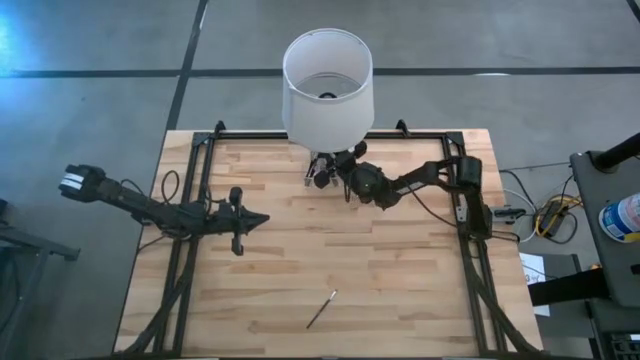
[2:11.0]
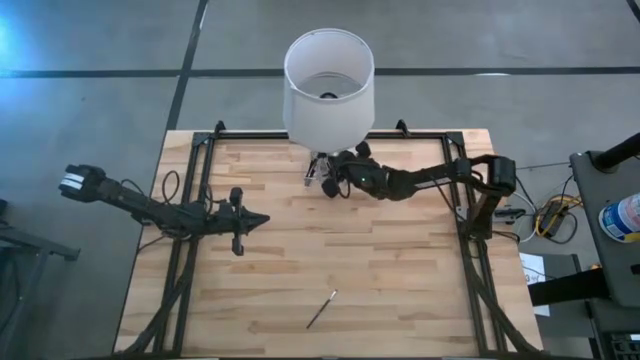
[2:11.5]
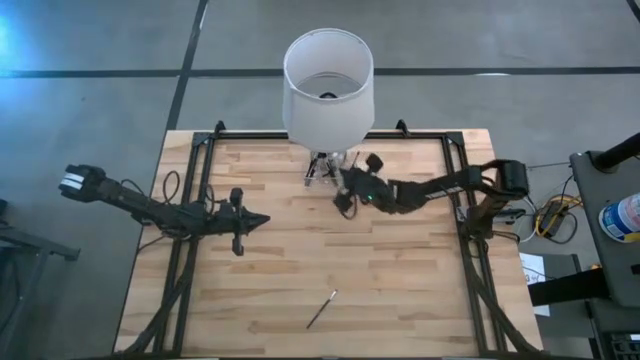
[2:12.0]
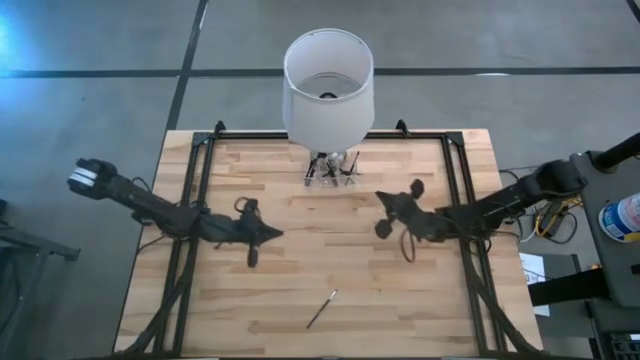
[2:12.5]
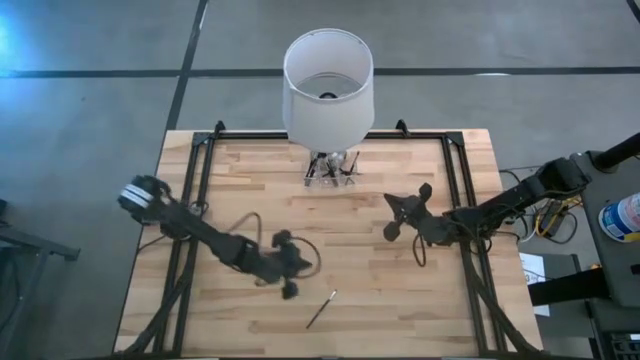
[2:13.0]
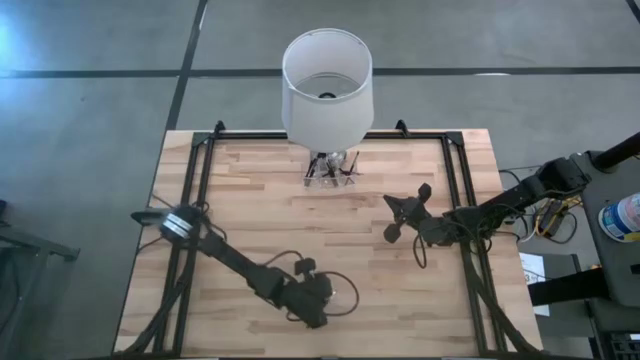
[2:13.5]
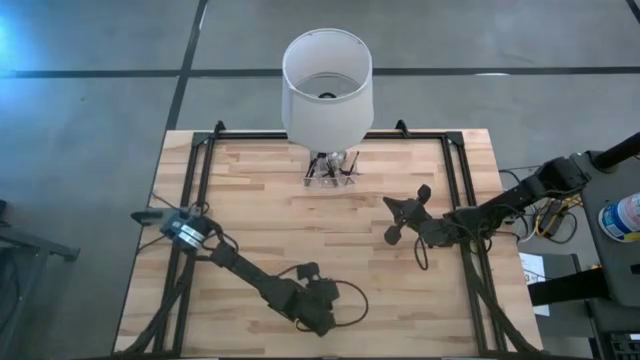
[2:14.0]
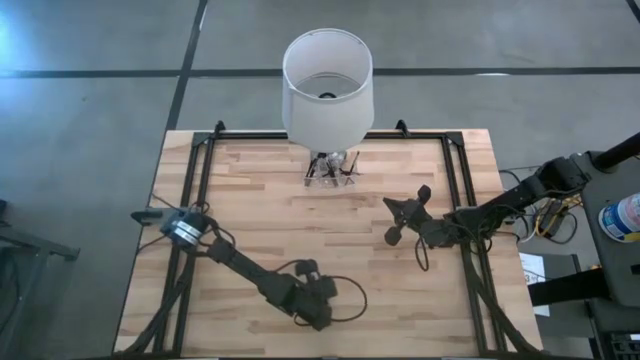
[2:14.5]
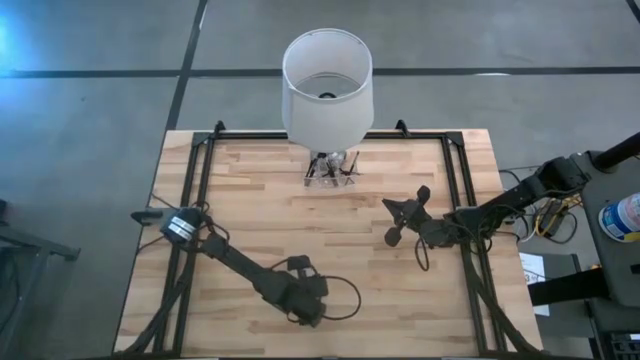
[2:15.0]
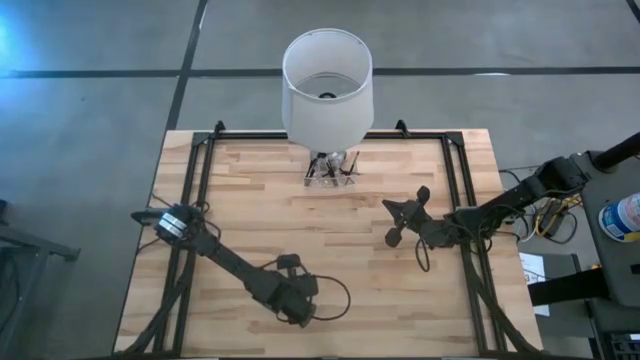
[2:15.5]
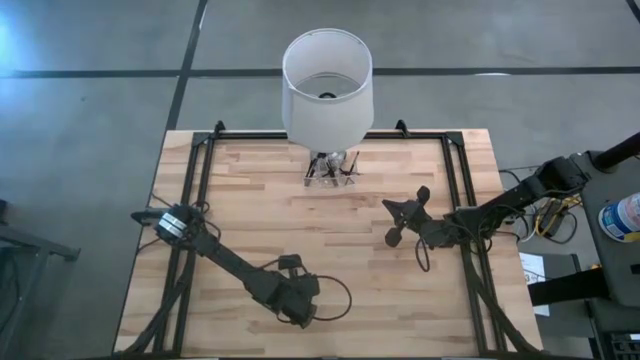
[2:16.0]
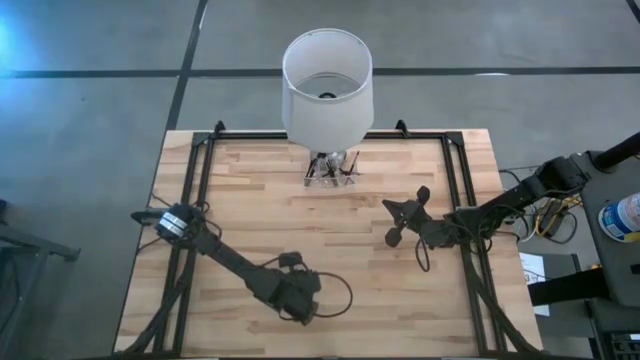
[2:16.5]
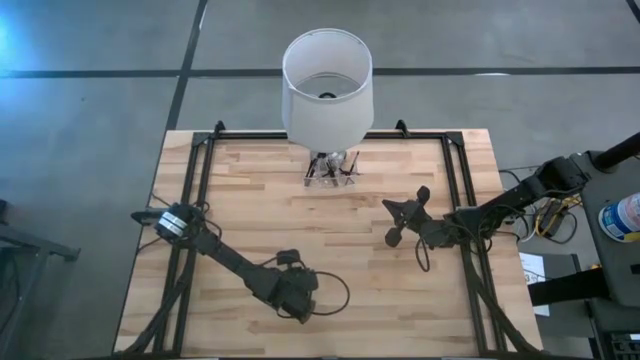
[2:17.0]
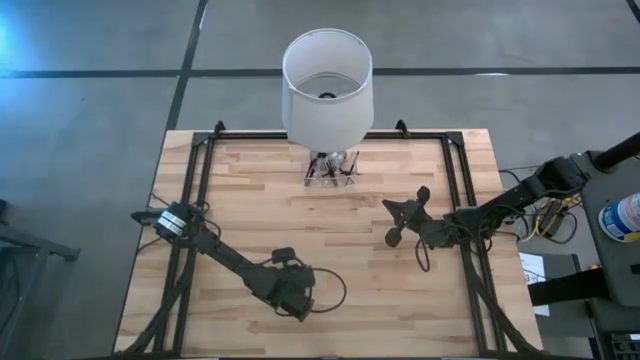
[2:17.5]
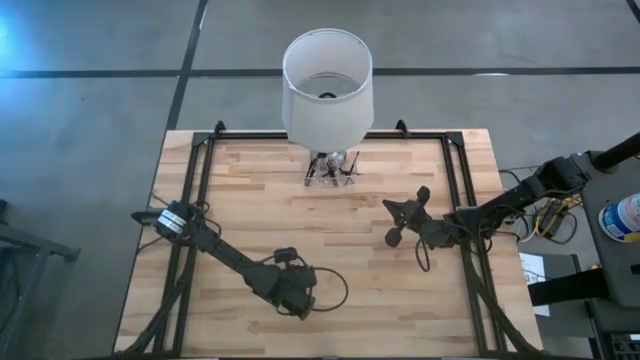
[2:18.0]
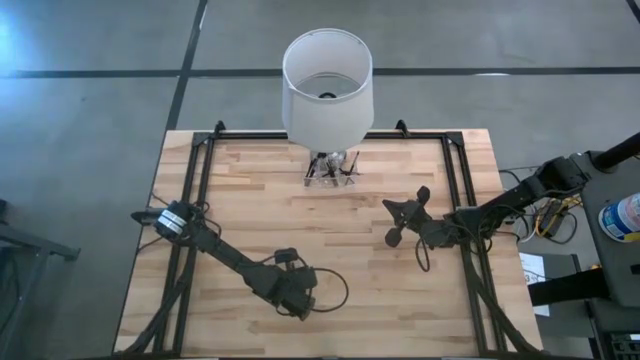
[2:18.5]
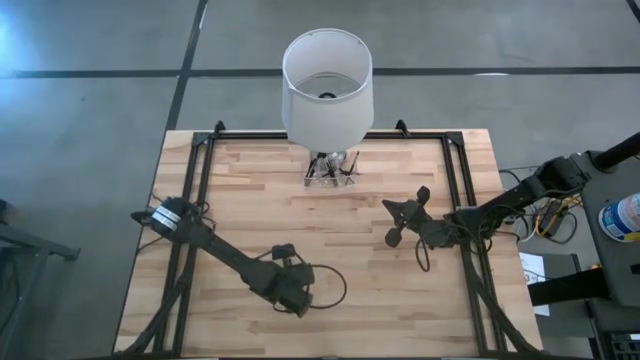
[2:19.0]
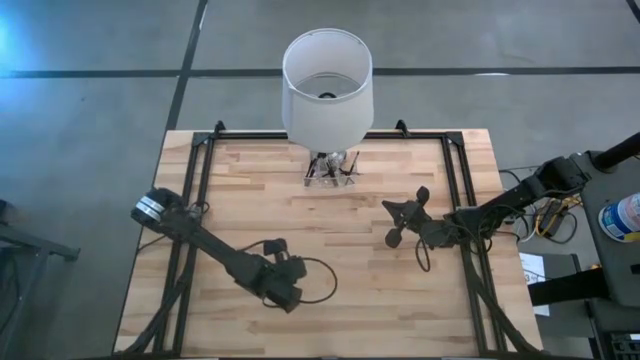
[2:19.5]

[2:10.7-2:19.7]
Task: Put items in baskets/containers
Put the black eyeshadow brush into the transparent organizer

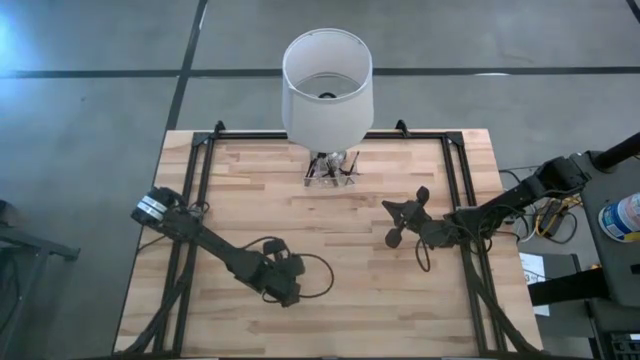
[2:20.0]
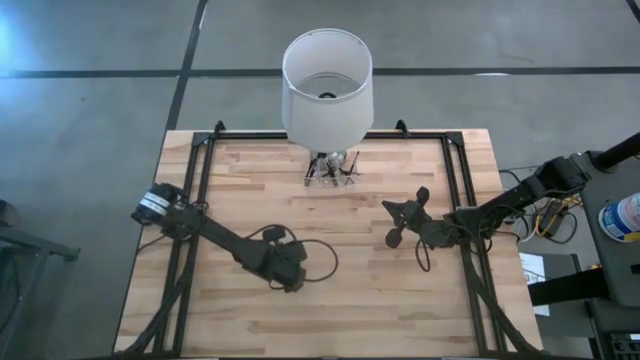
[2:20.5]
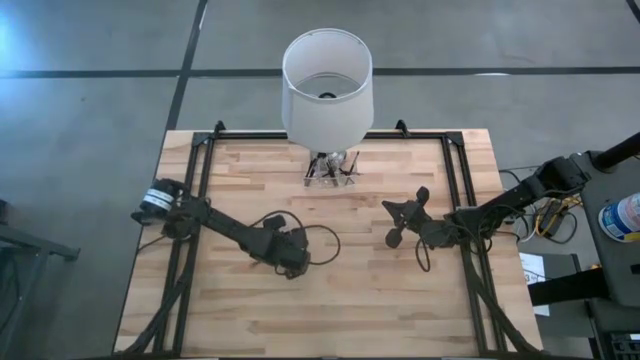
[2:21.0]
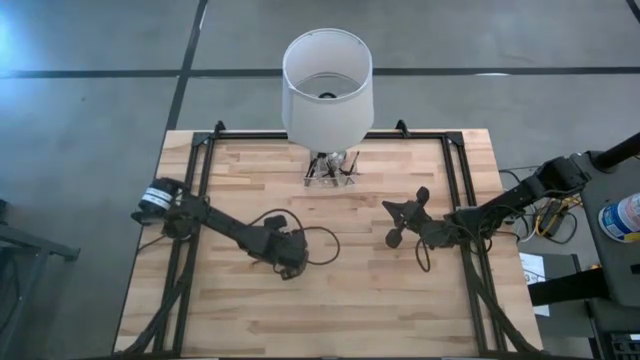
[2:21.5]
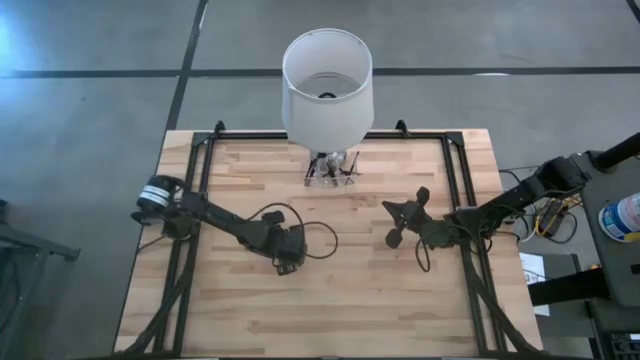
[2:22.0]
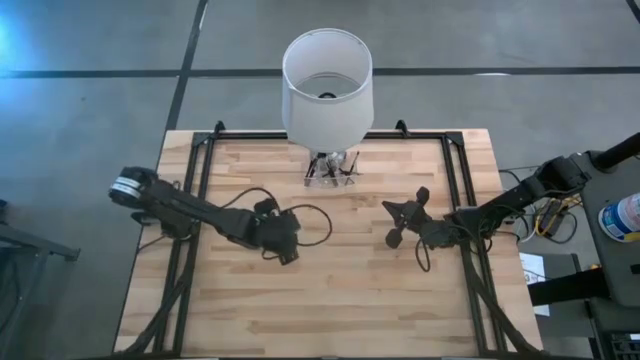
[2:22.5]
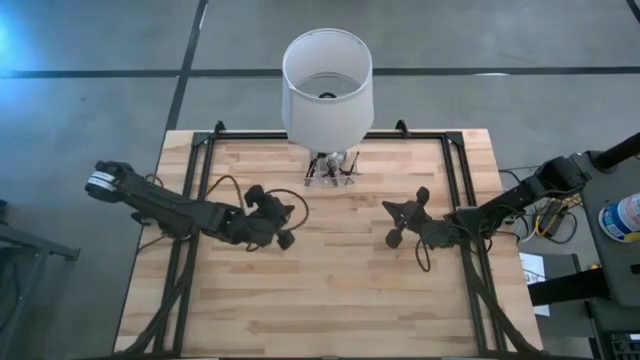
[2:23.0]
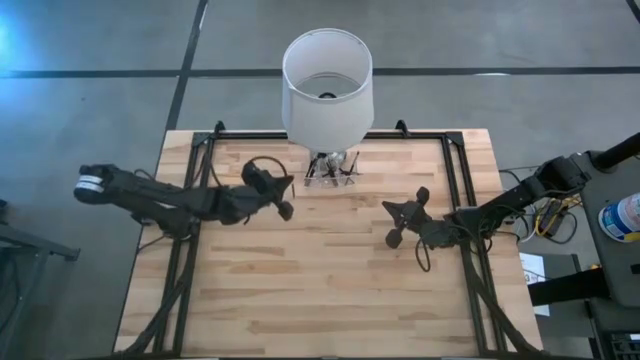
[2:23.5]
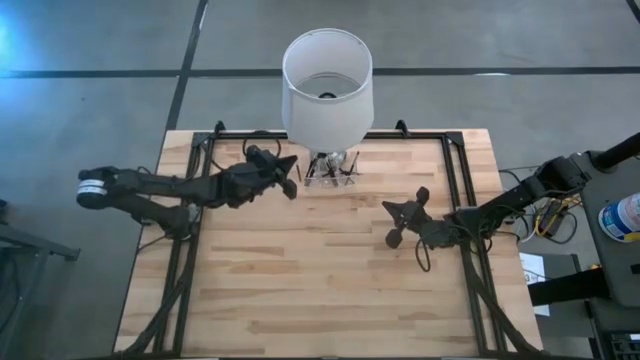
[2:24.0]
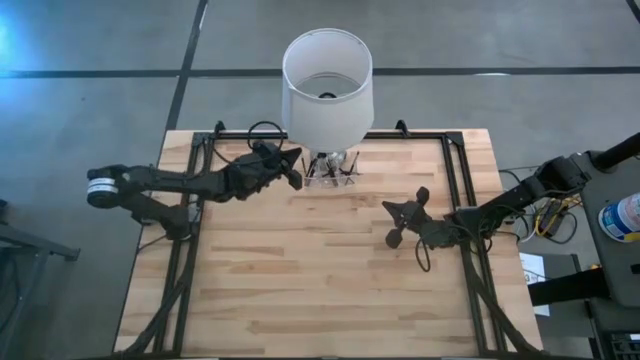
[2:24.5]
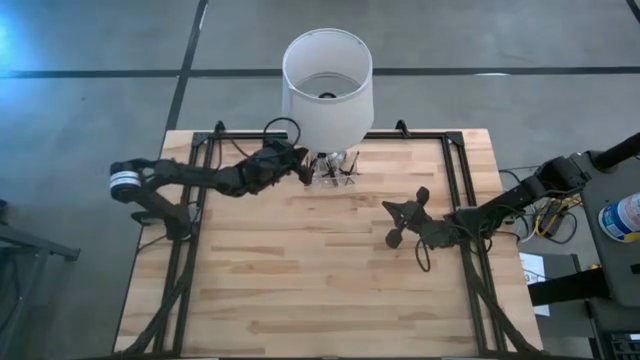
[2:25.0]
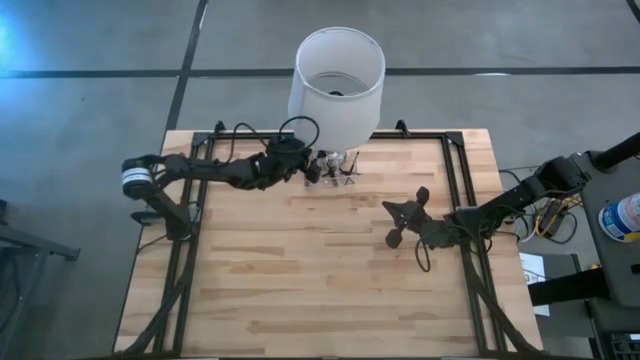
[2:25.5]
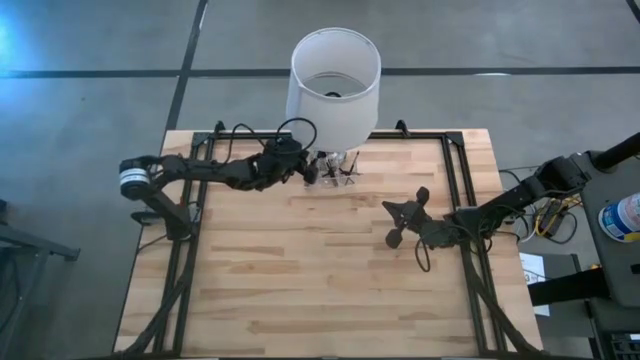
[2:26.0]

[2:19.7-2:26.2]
Put the black eyeshadow brush into the transparent organizer

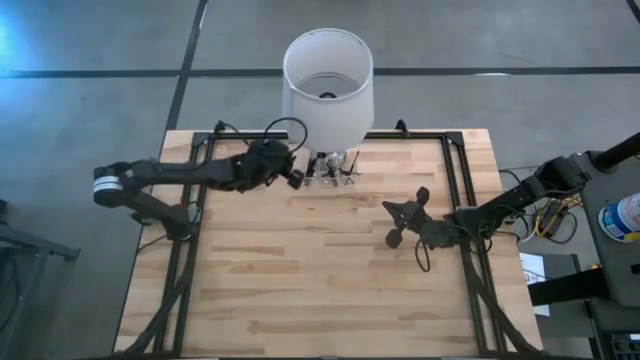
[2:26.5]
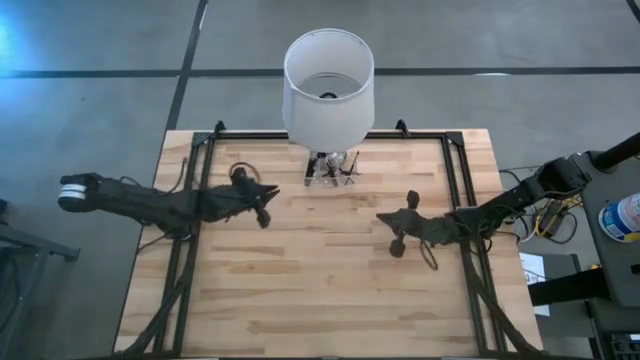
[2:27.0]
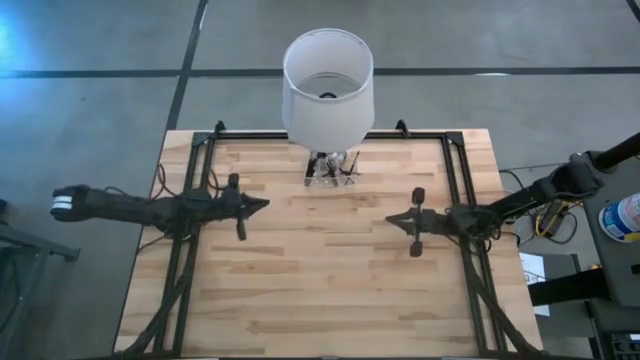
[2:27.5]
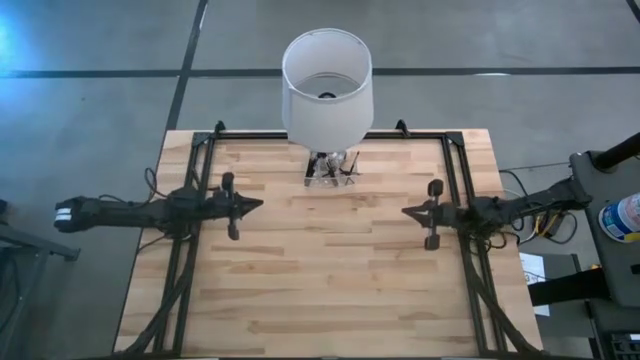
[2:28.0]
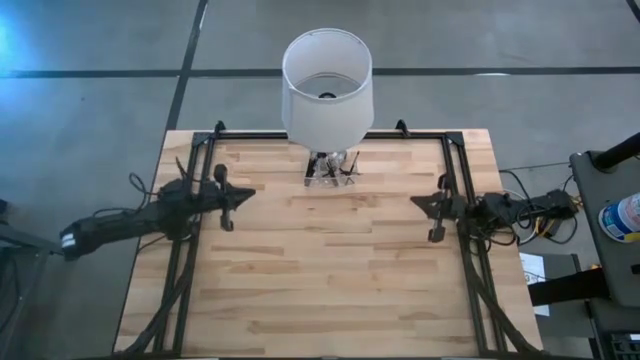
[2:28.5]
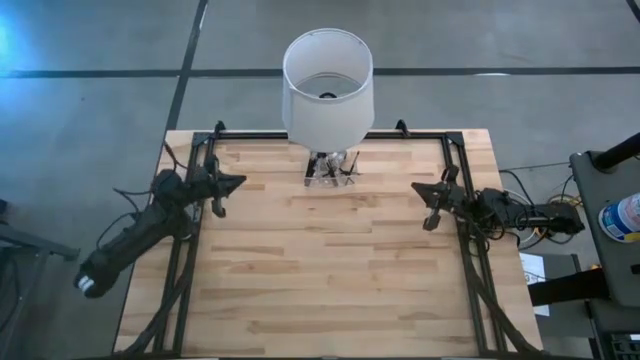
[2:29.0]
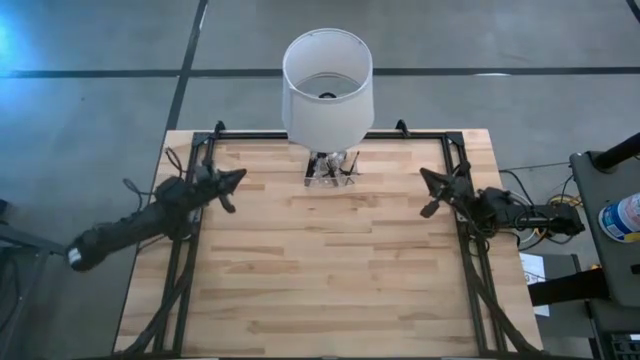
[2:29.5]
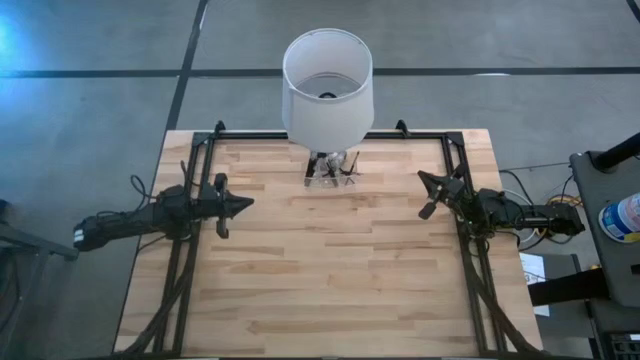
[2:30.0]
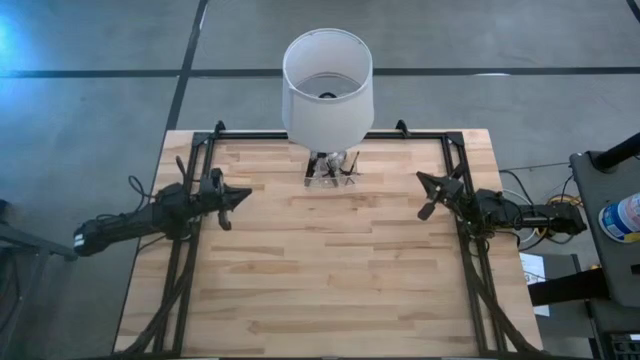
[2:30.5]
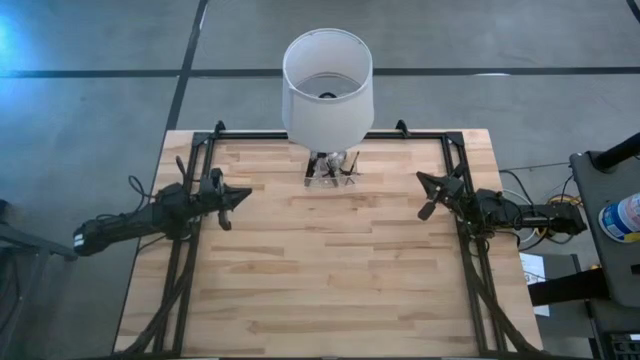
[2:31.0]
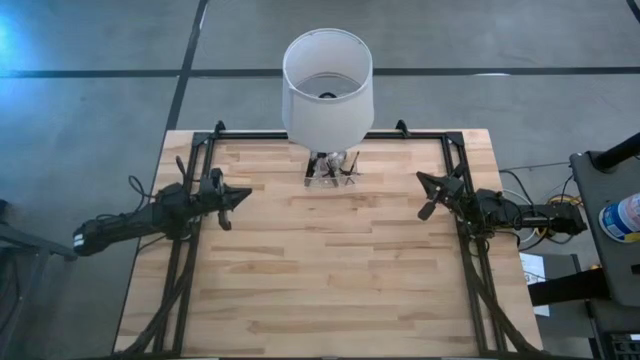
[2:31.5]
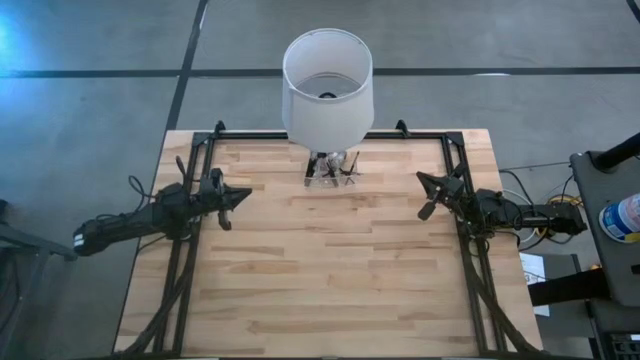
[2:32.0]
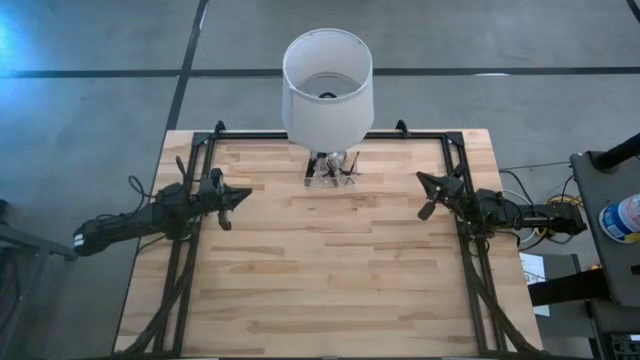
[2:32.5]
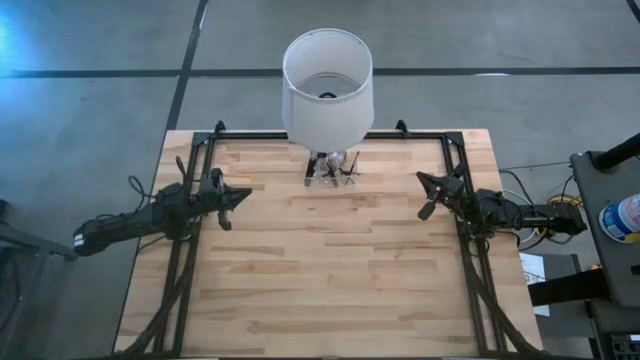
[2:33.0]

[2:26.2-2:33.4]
Return to Home Position
